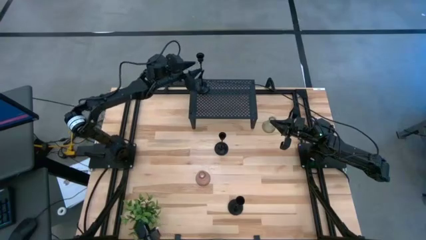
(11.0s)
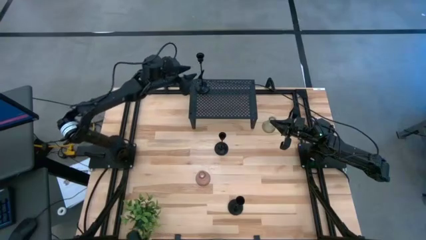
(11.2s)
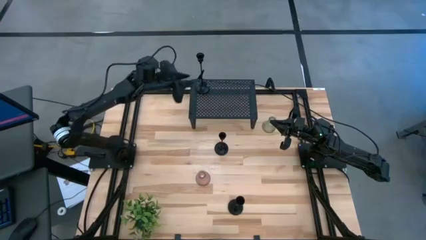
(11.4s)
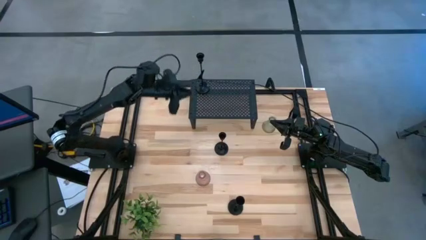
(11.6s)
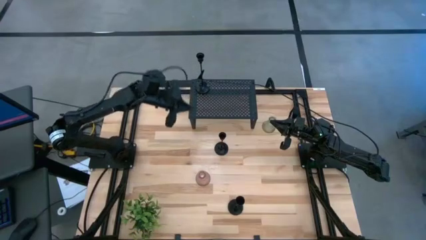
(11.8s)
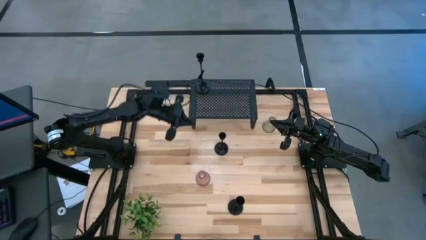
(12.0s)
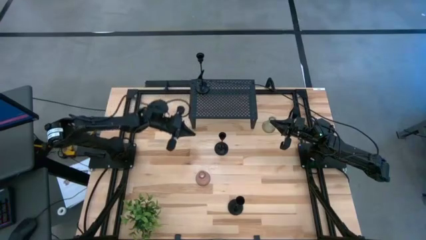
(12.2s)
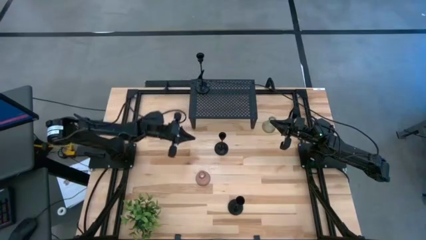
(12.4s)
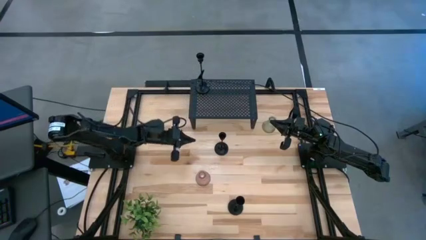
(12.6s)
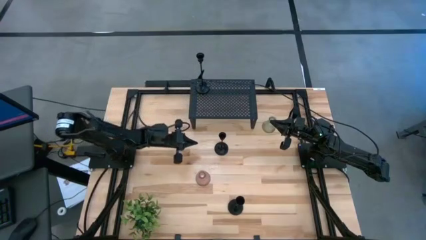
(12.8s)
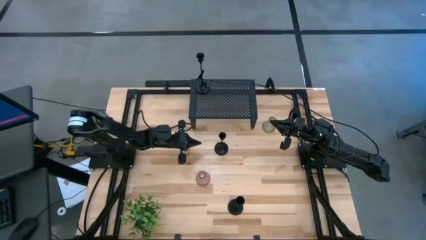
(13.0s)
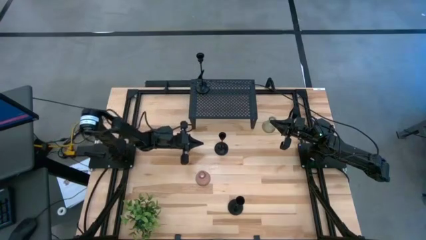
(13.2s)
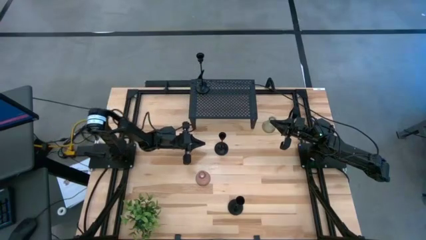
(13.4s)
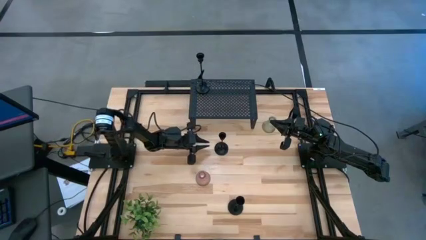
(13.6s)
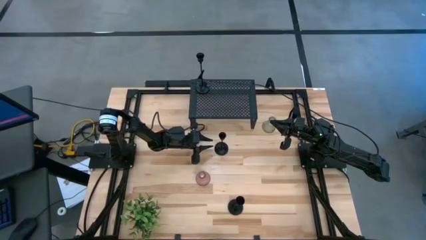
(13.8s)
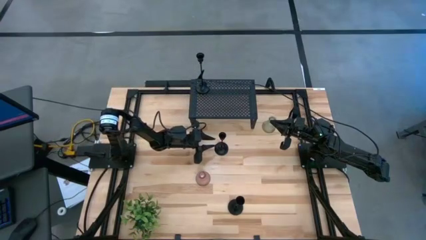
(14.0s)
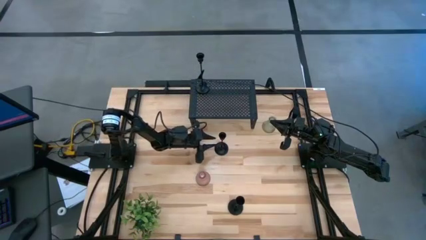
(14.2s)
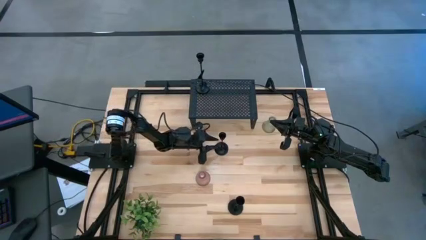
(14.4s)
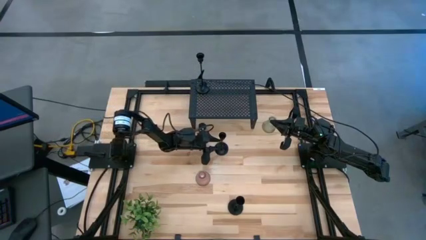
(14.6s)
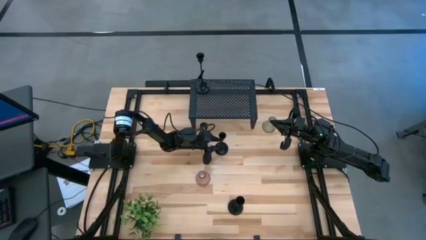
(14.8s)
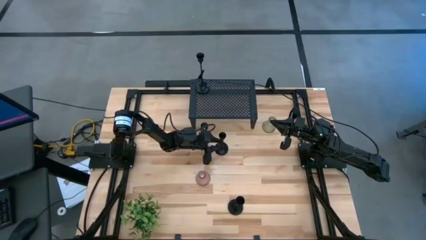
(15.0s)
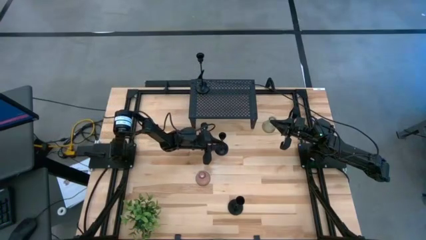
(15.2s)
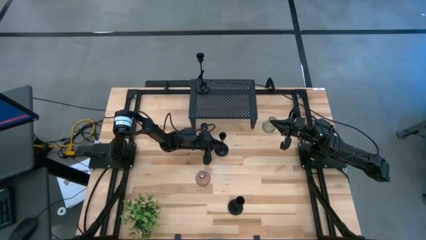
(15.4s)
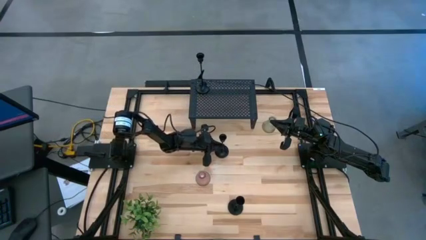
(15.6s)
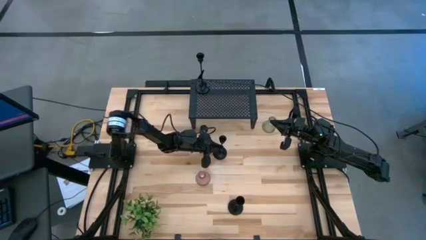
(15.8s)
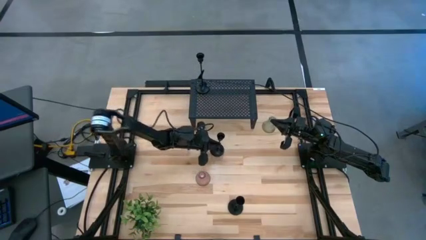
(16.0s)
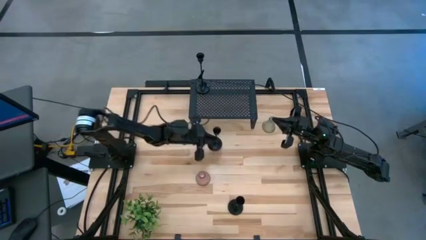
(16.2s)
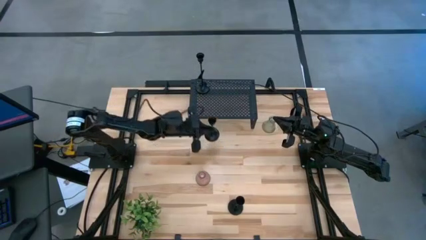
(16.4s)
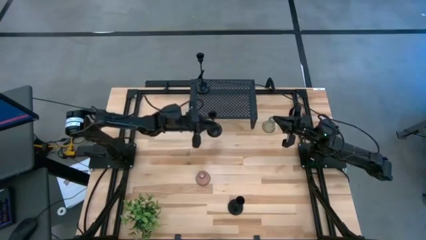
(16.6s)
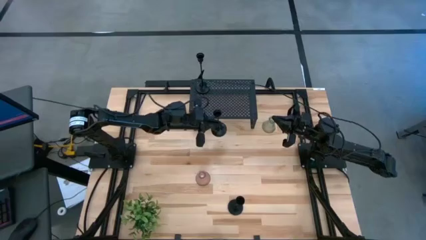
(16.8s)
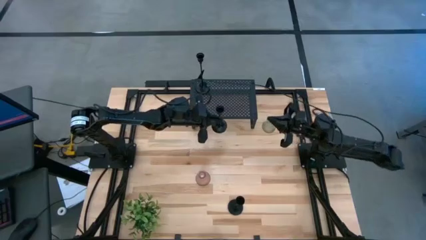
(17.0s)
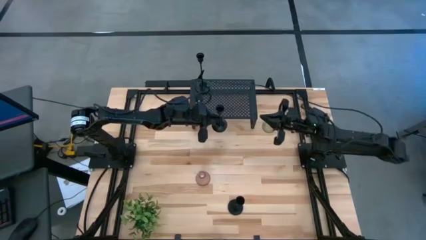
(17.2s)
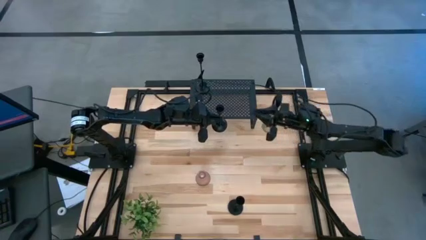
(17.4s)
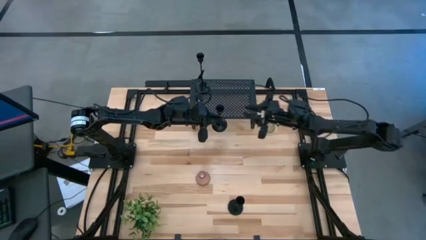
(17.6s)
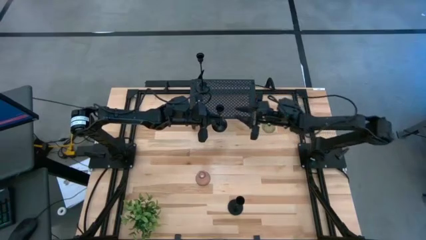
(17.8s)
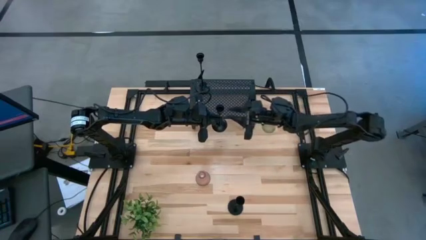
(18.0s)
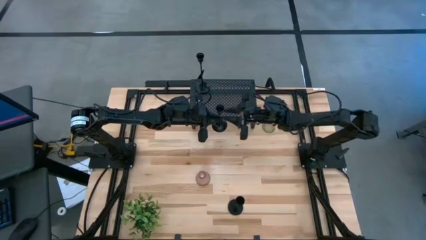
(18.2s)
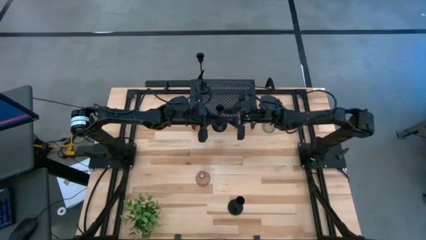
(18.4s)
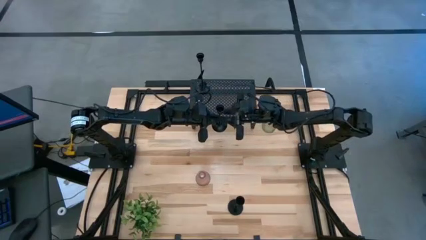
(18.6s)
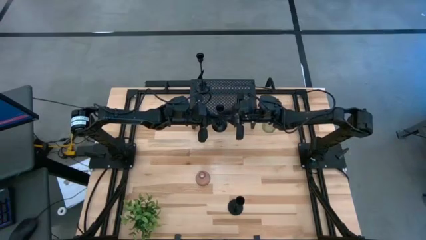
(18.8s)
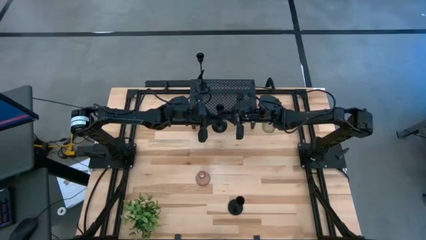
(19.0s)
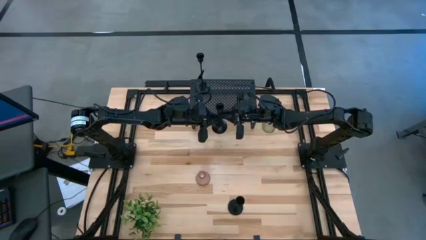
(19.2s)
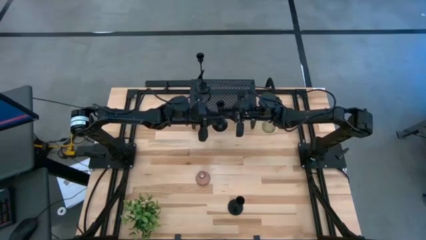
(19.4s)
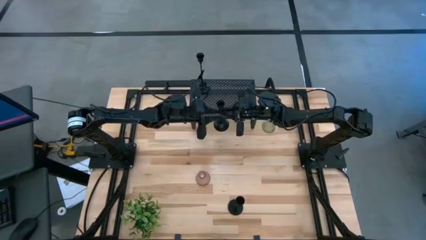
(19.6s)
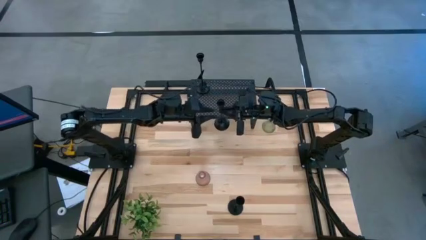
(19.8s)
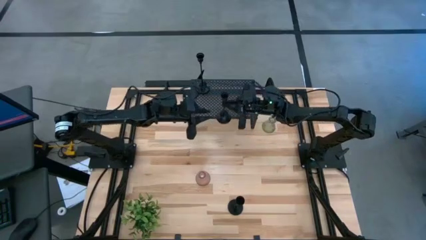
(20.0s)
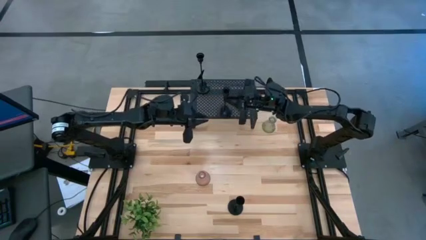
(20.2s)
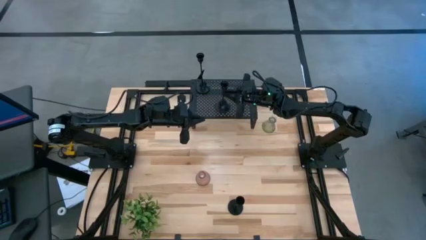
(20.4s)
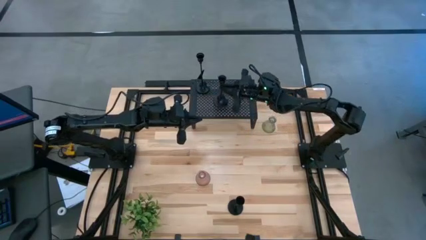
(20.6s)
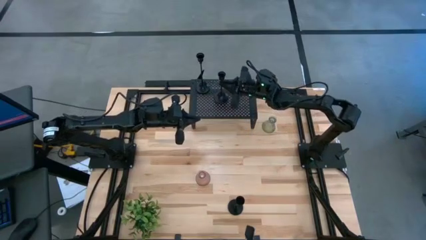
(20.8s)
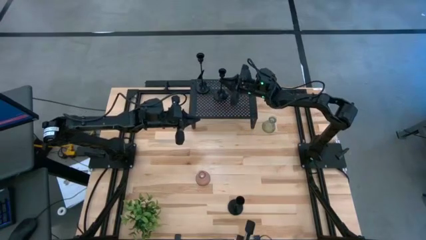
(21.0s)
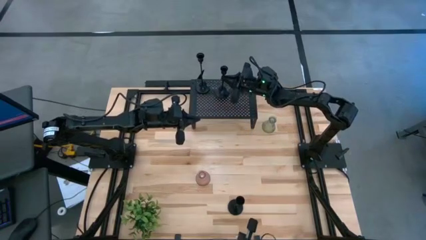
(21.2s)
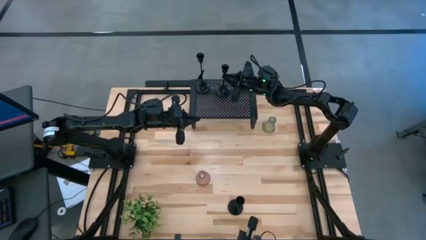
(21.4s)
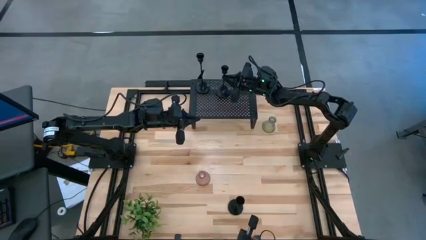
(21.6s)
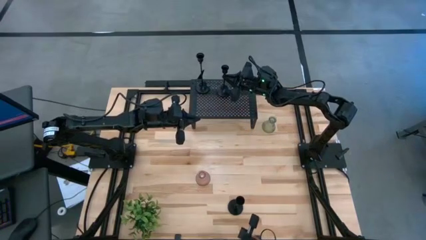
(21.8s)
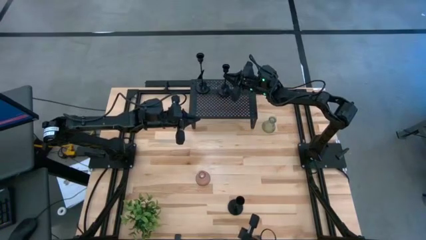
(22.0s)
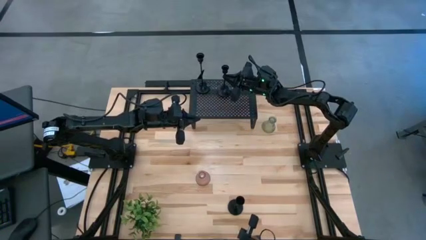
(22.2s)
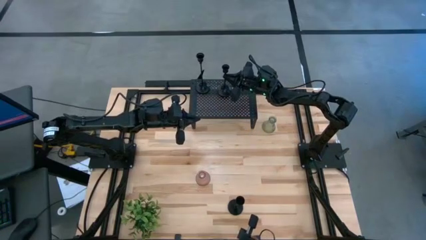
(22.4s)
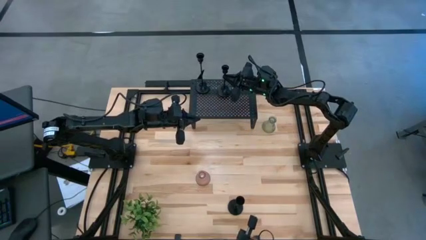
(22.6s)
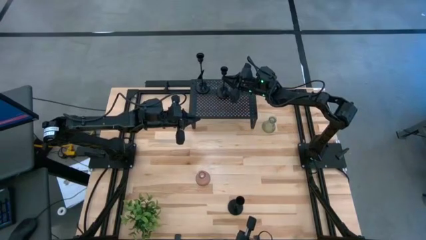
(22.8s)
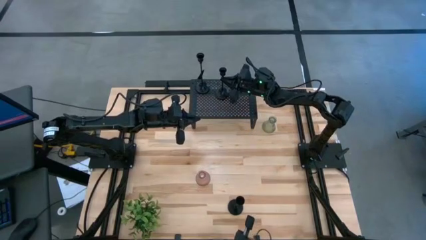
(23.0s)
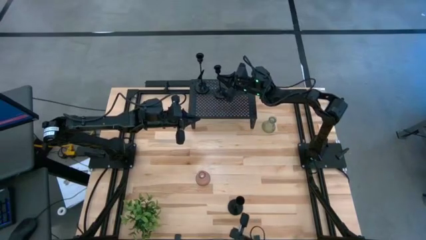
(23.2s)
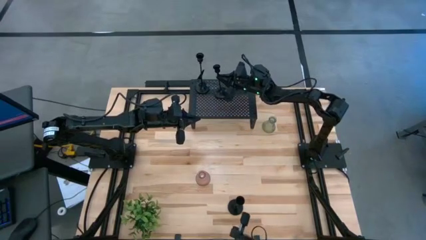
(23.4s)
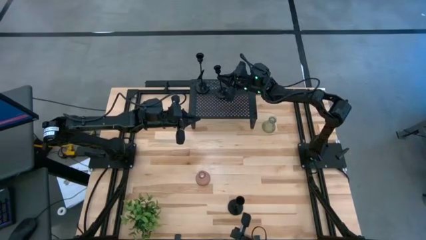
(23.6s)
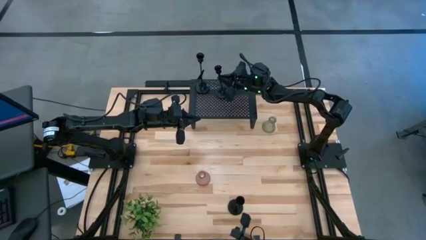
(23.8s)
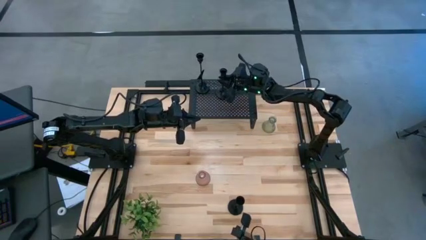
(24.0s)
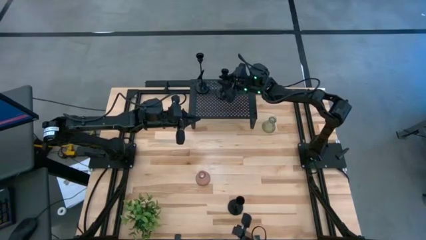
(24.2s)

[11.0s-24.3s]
Task: Pick & Place candle stick holders
Put the top black candle holder on the shelf
